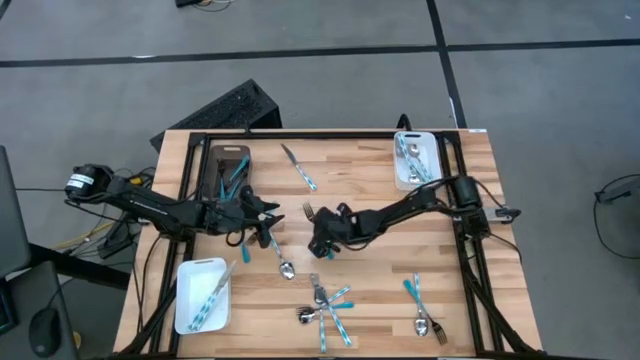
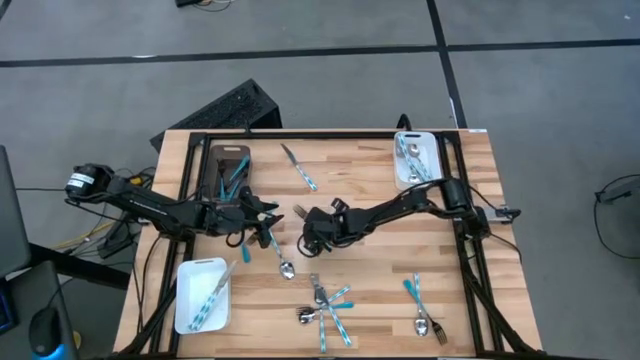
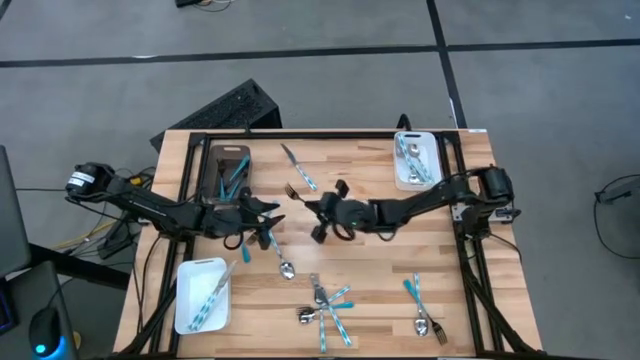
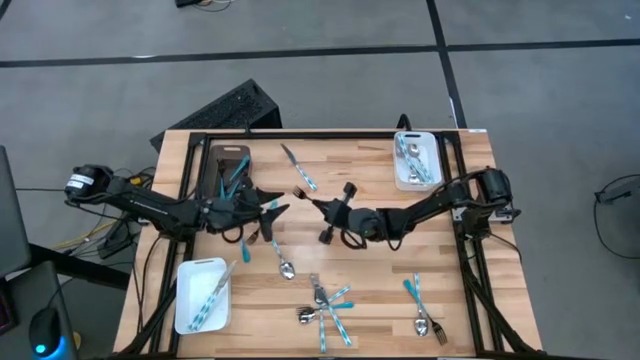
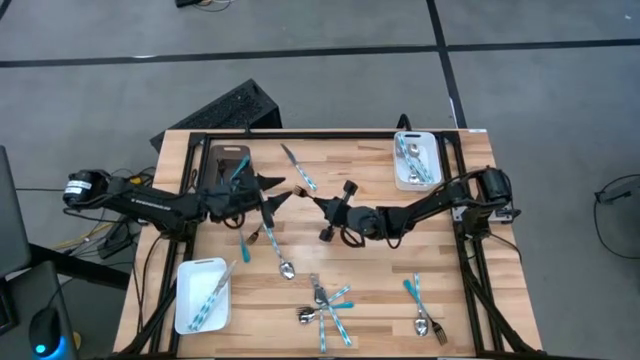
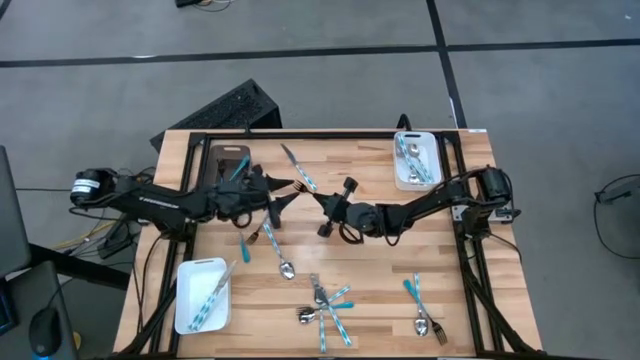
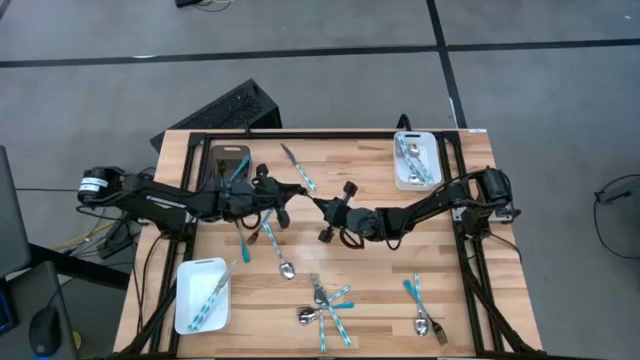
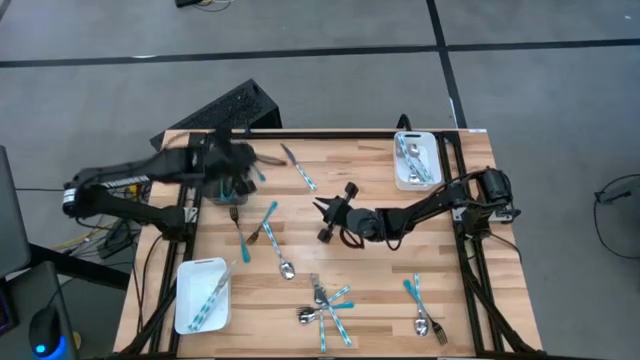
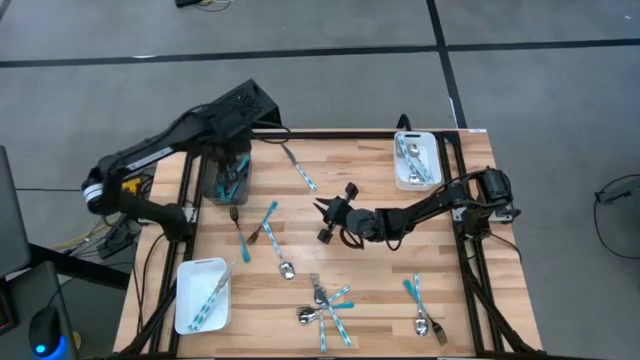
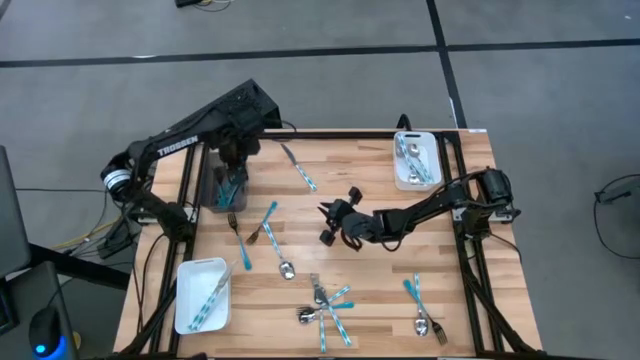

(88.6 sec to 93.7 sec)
Task: Sort silverware by color (type)
Put the blue fork into the black bin

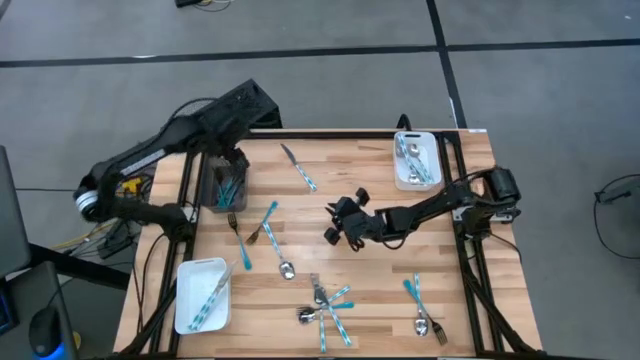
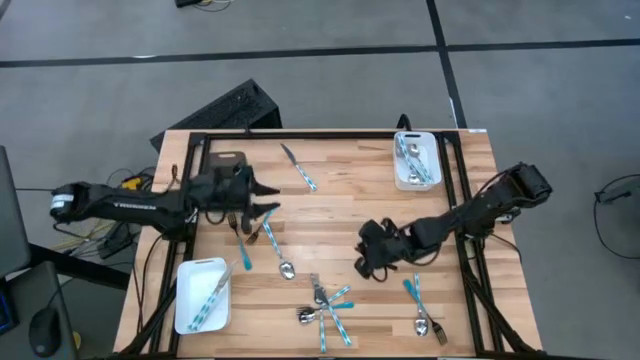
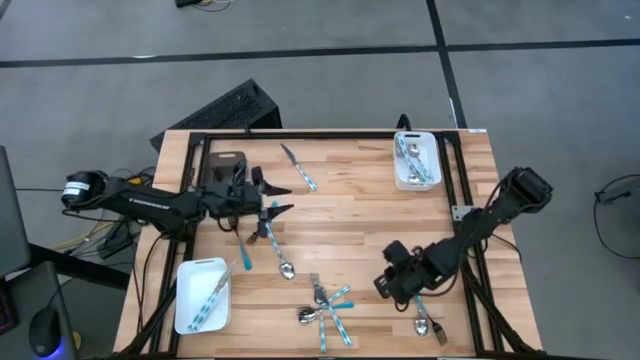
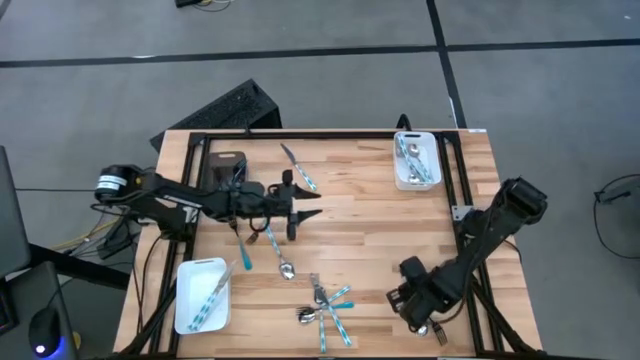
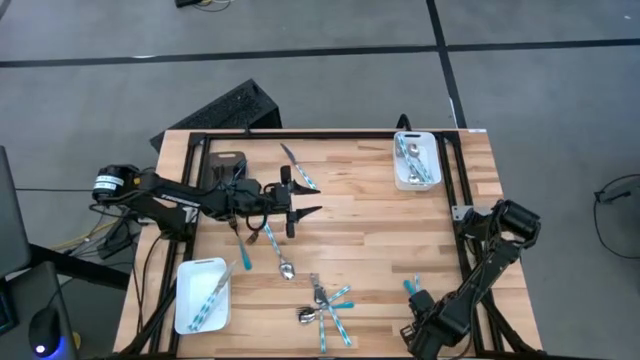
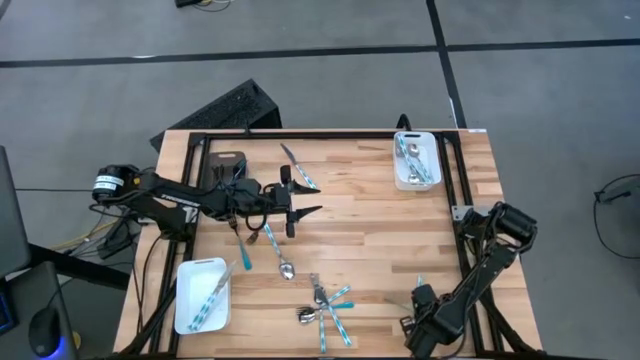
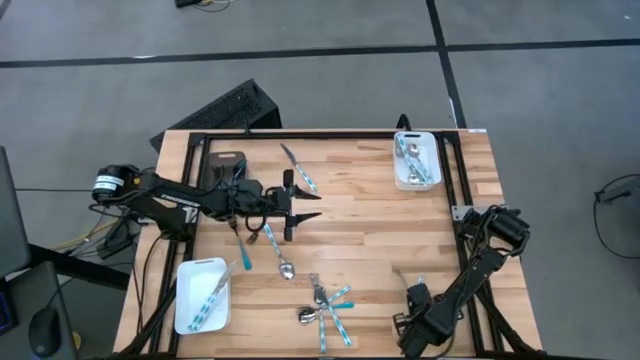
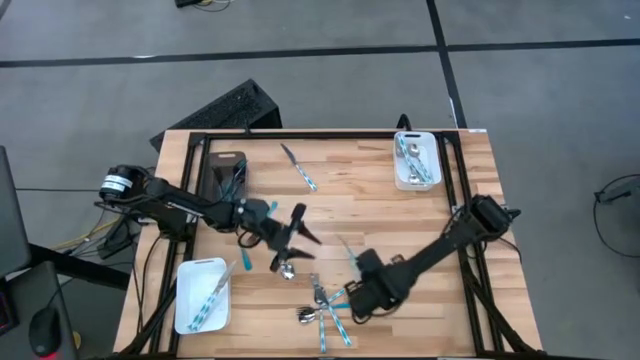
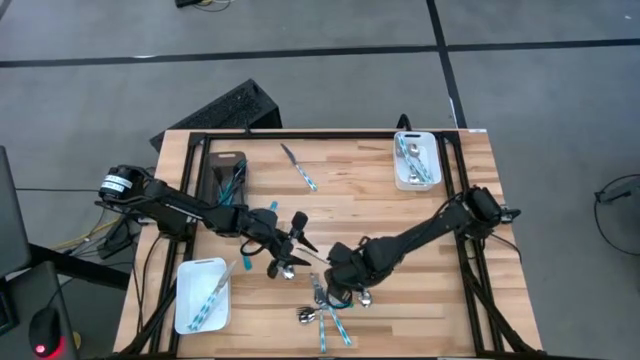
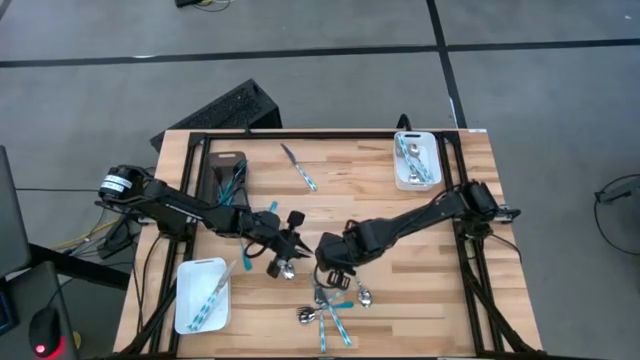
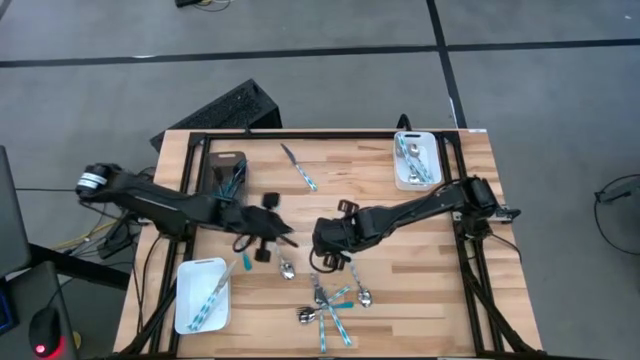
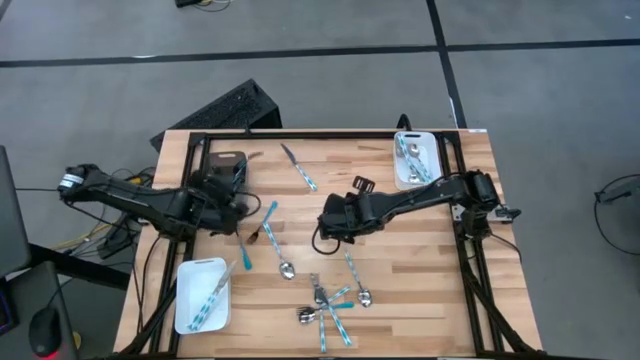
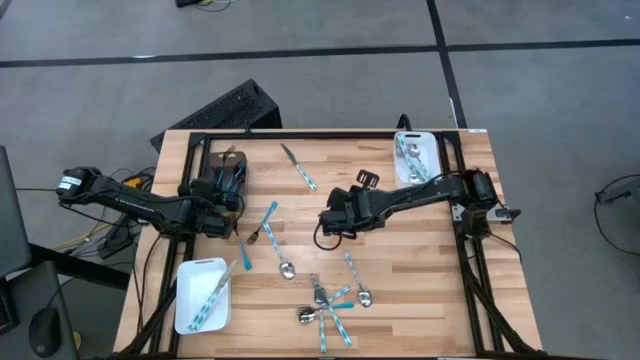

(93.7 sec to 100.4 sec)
Put the blue fork into the black bin

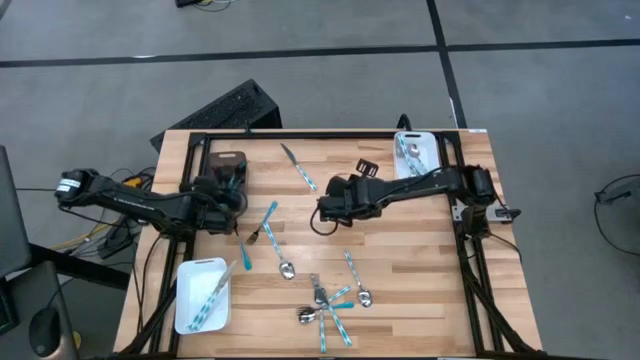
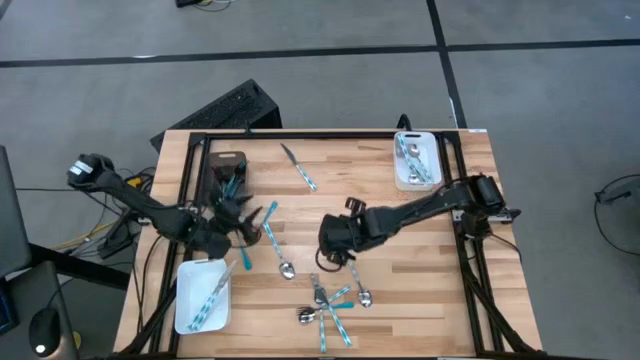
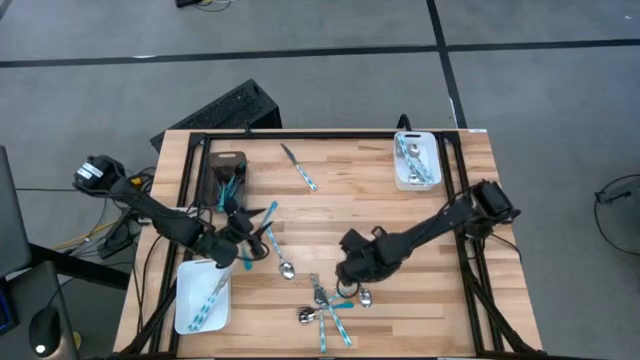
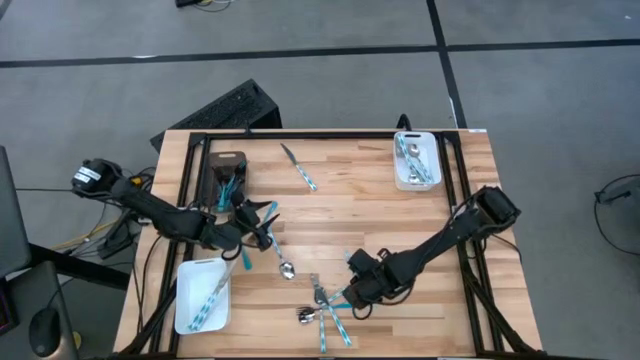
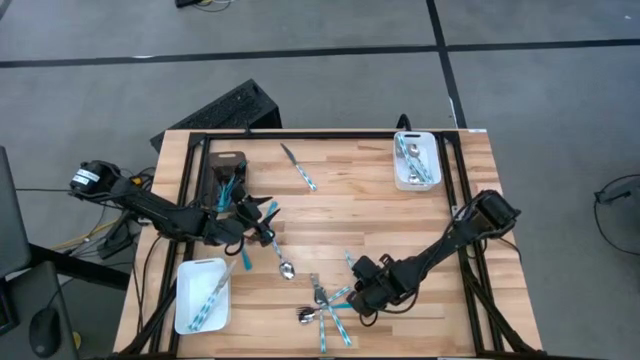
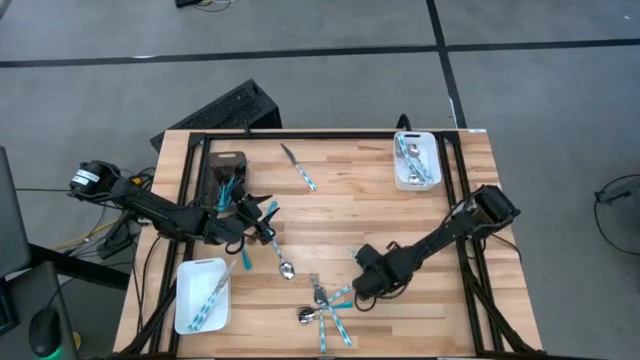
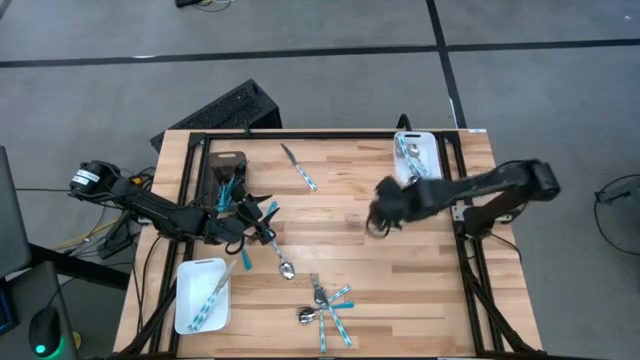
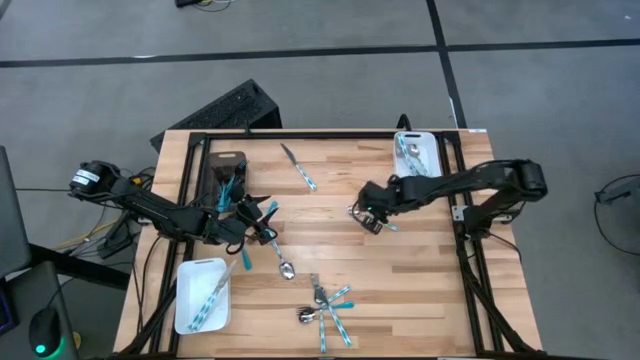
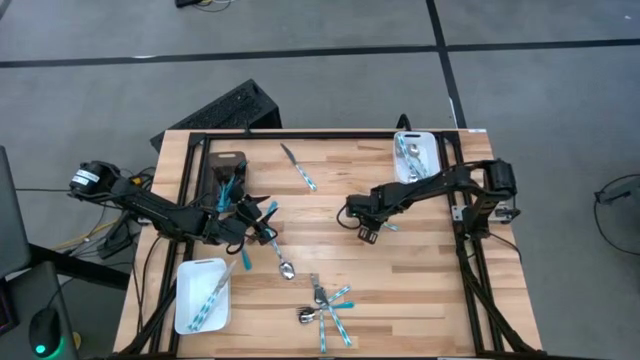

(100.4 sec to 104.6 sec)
Put the blue patterned spoon into the top right white bin

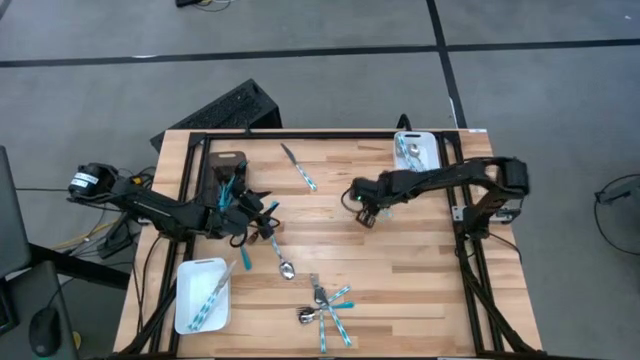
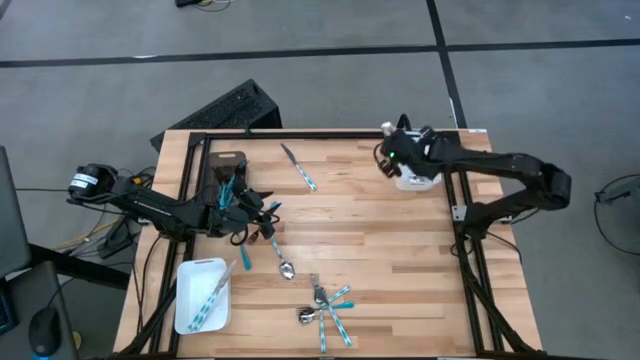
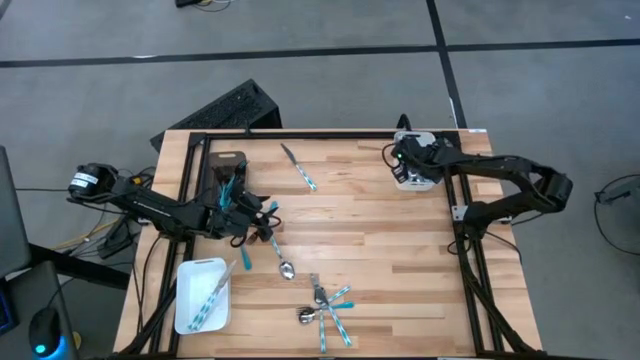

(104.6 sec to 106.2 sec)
Put the blue patterned spoon into the top right white bin

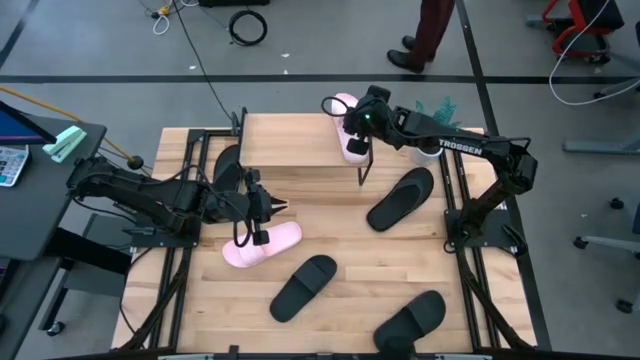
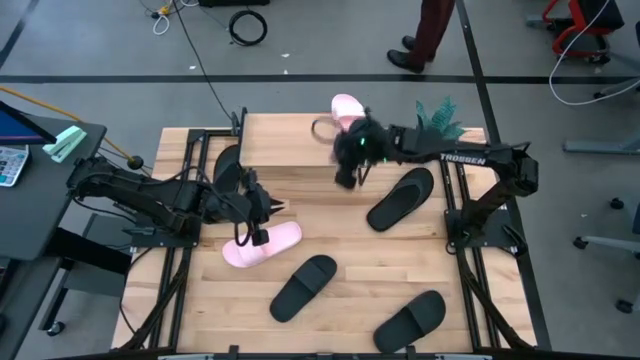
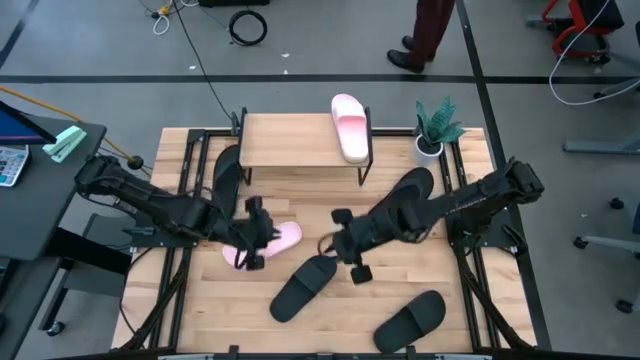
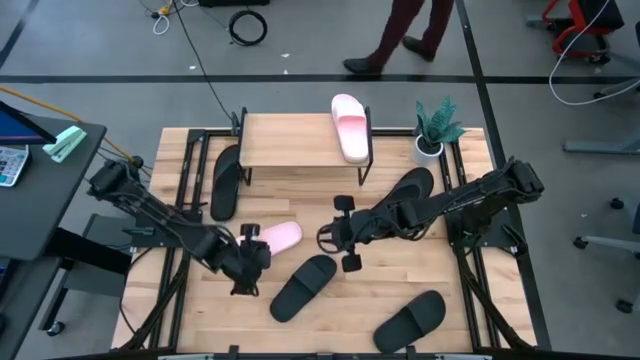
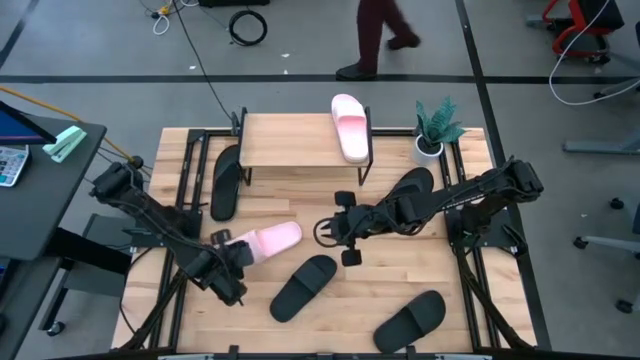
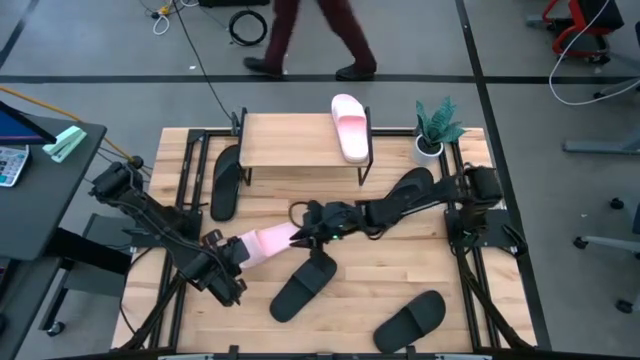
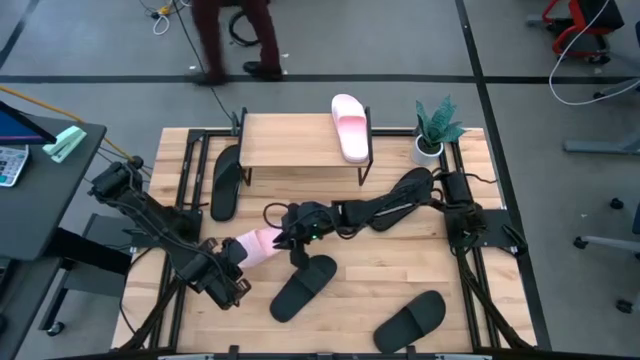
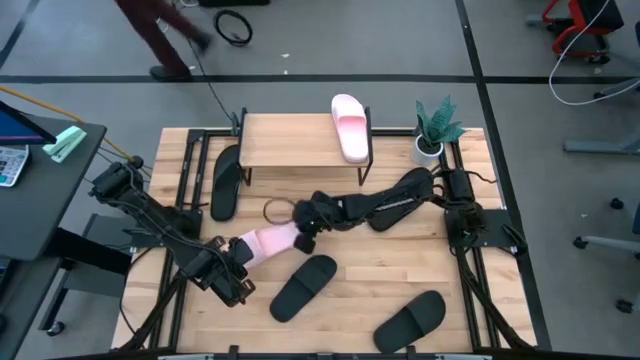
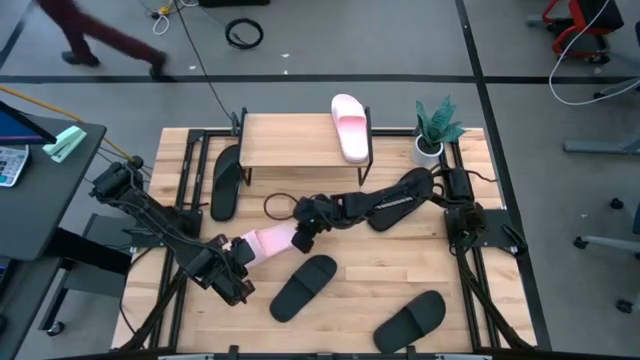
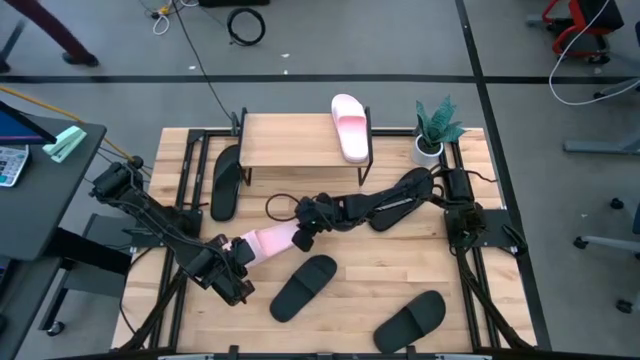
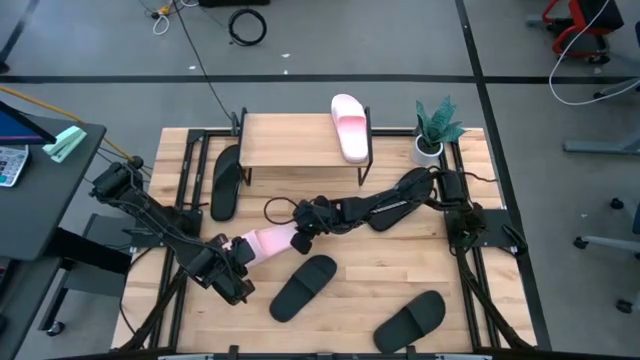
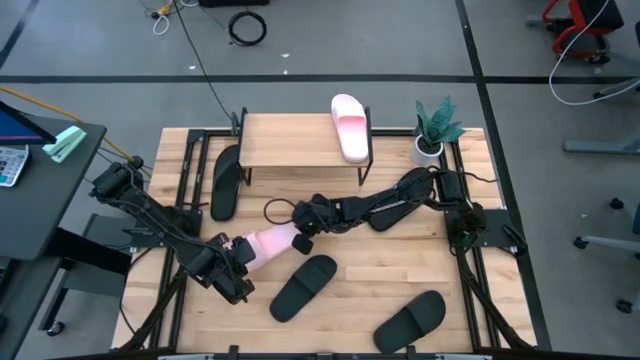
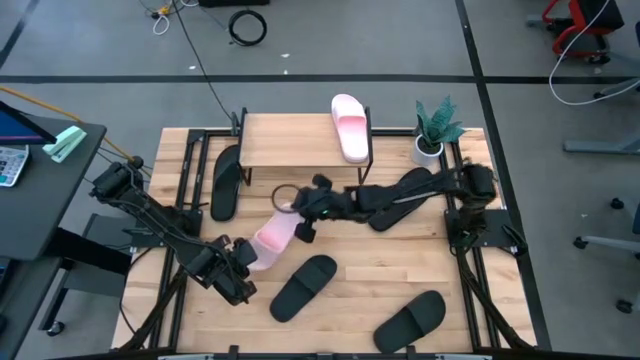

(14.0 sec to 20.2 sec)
Task: Pick and place slides into the shelf
Align the pink slide on the shelf with the other pink slide
